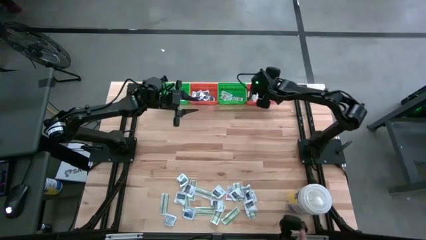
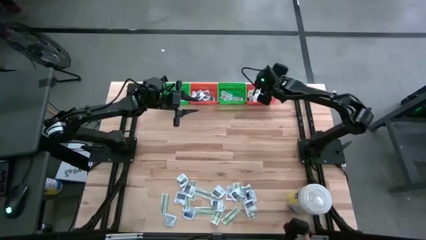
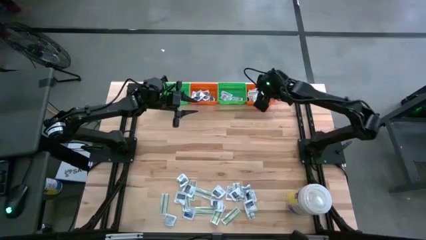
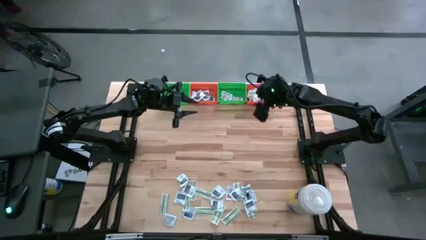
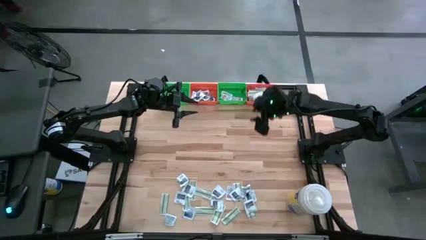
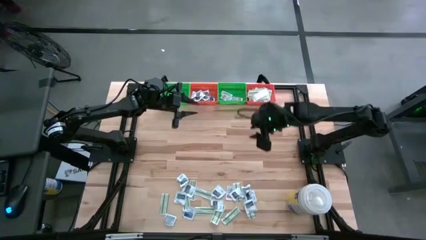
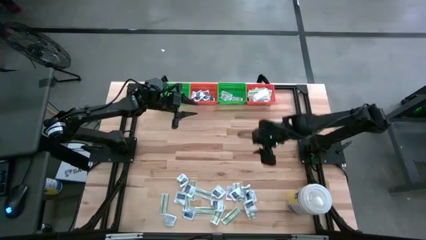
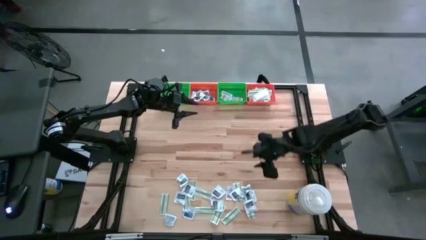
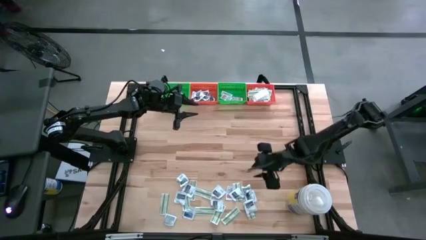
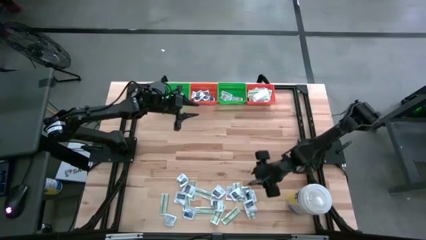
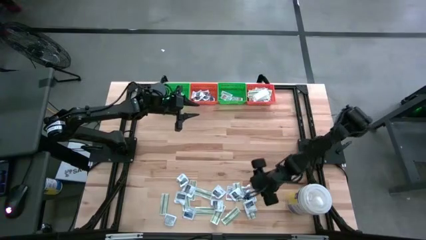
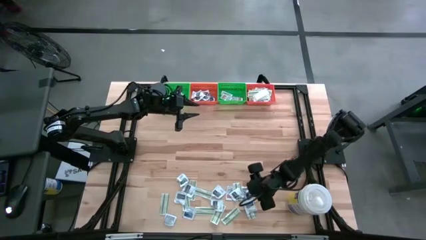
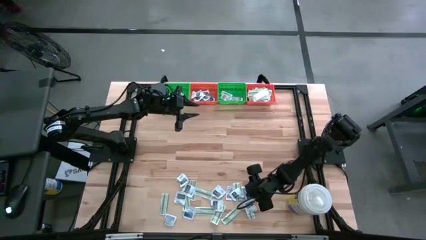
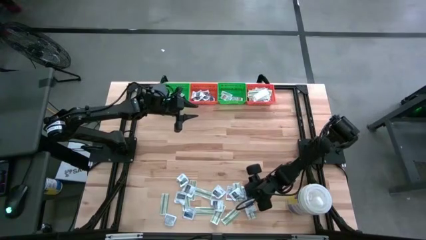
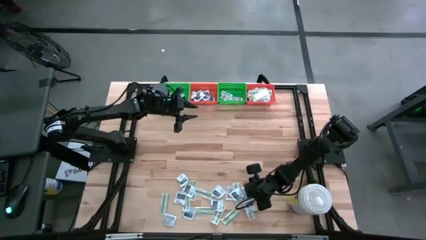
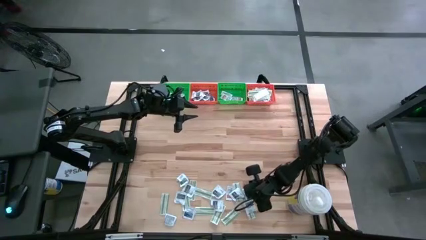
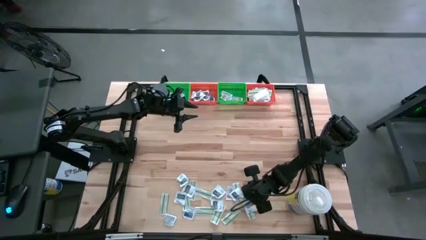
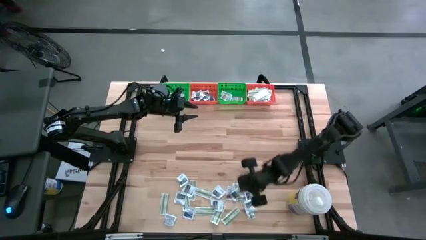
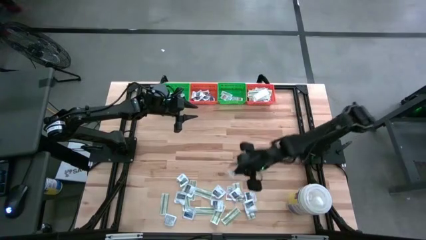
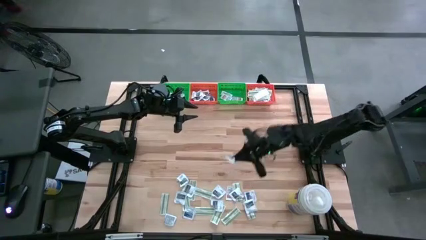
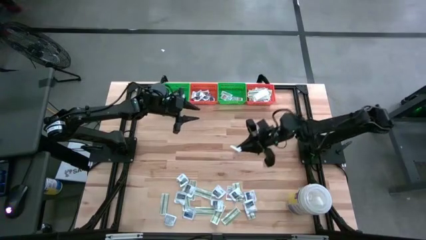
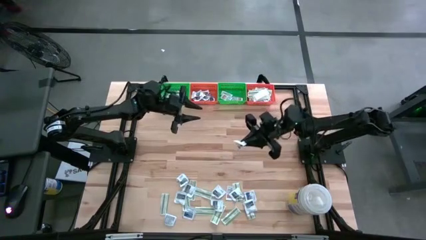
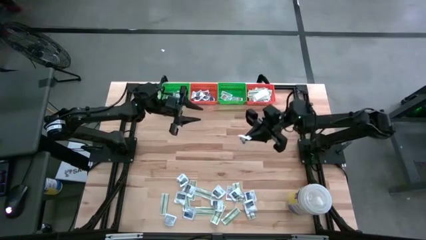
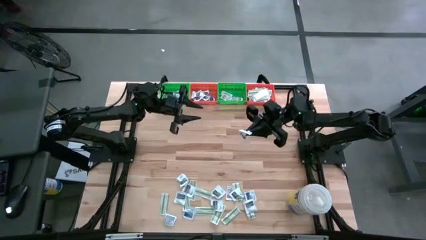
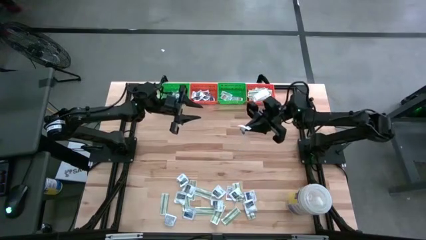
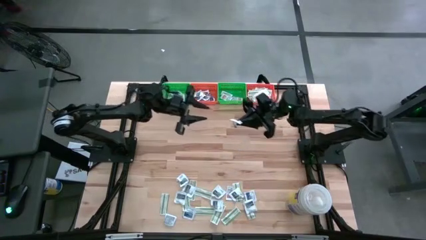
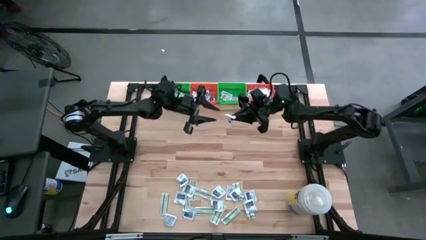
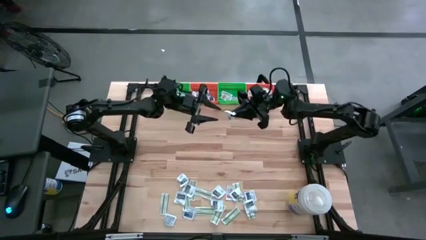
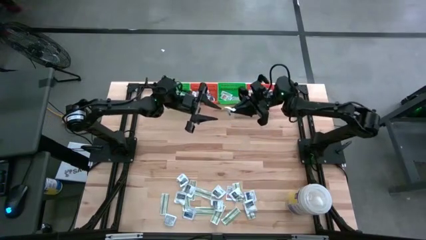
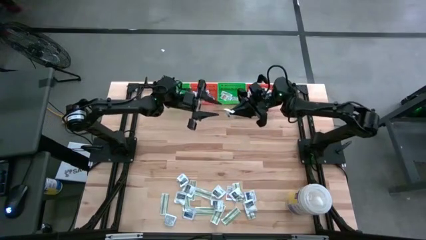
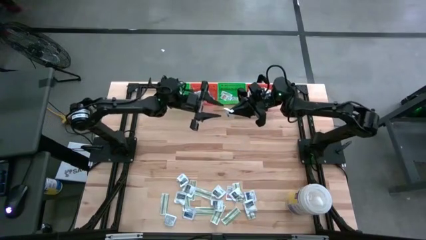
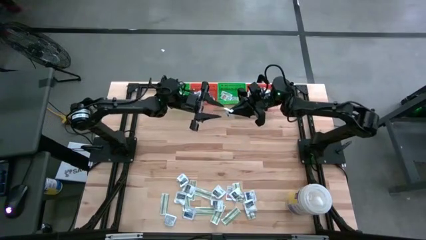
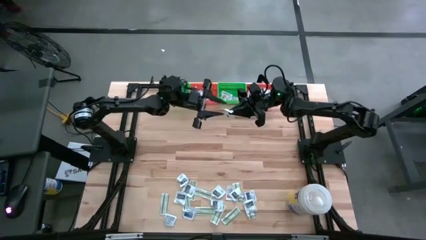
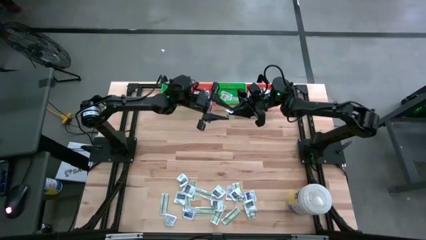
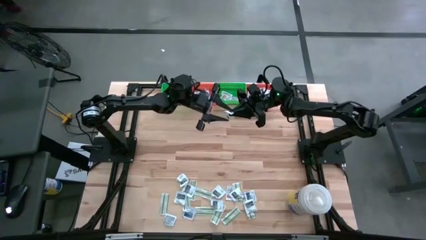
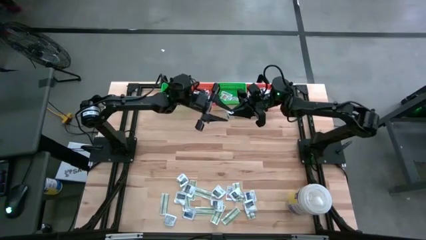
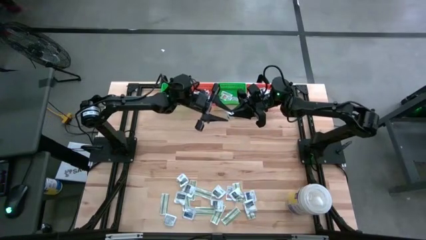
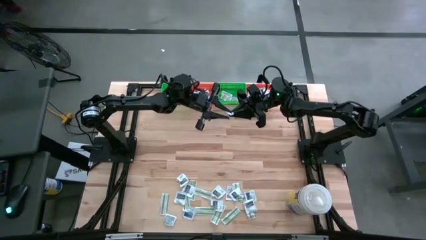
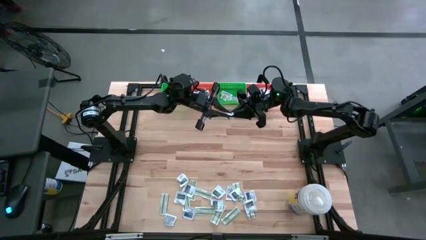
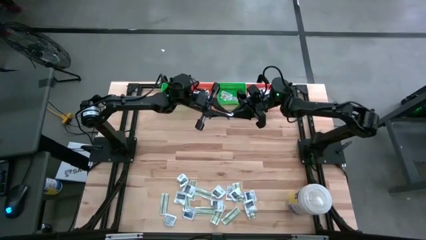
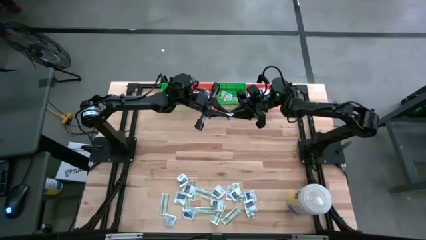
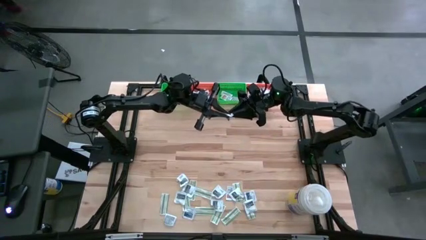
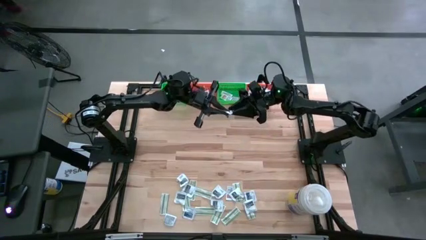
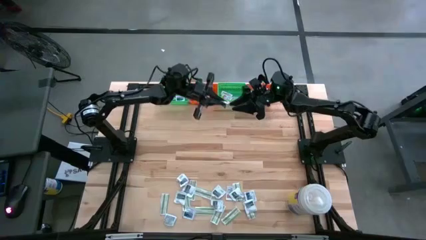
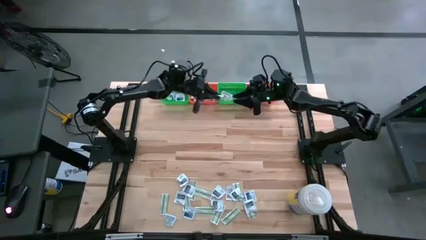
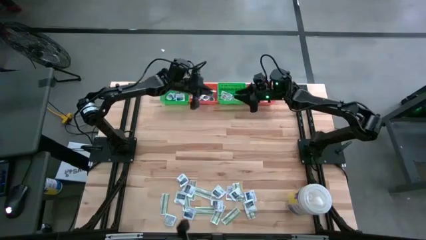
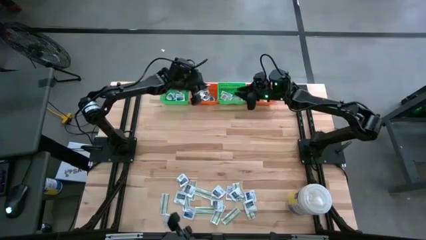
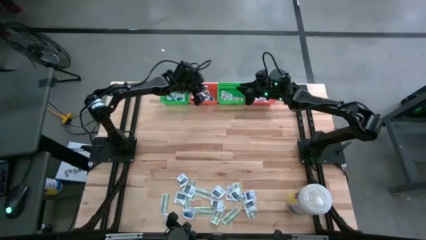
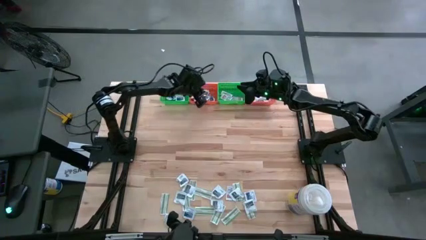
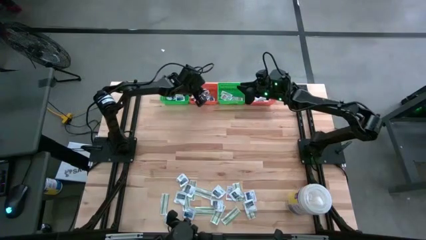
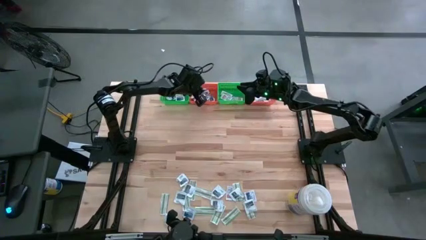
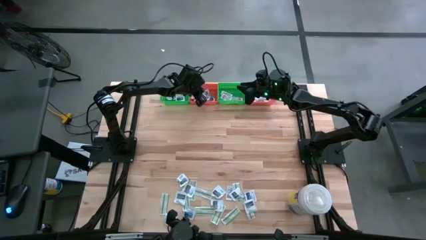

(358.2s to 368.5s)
Task: Pick & Place First Aid Supplies
Put the gray towelette pack in the left orange bin

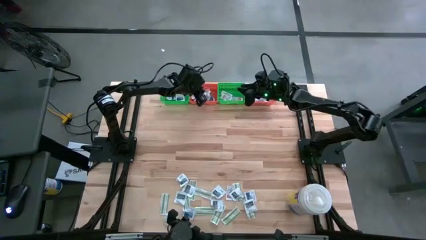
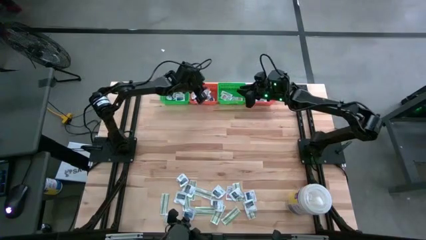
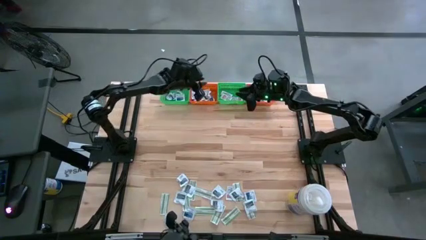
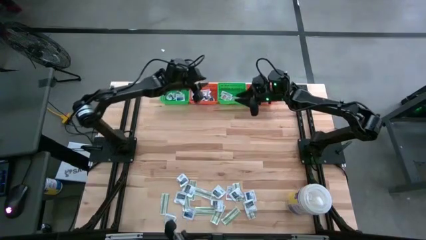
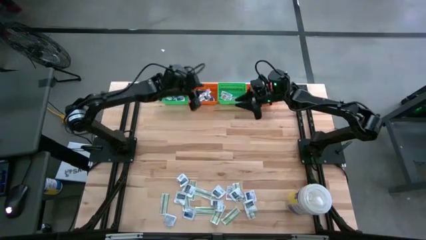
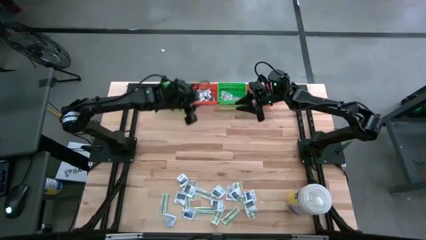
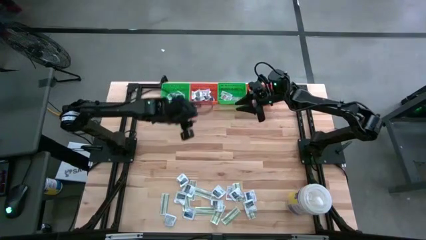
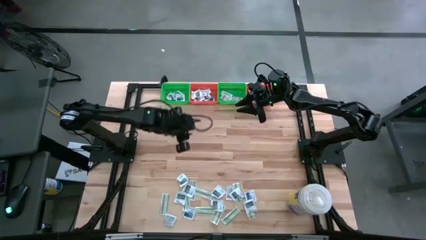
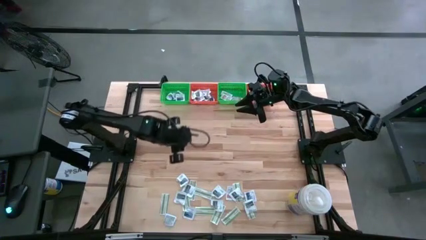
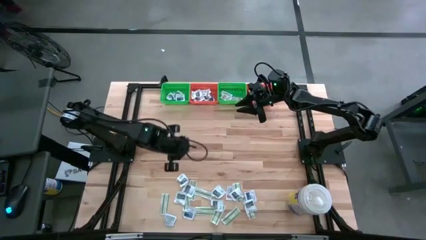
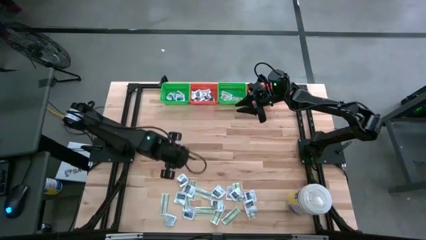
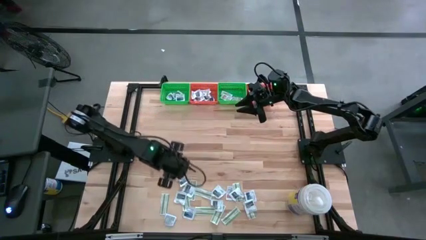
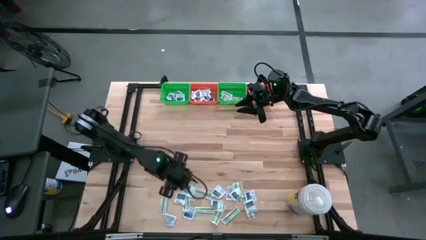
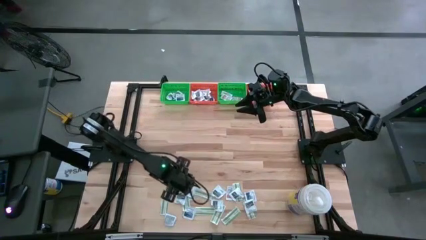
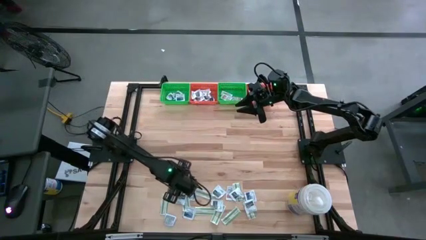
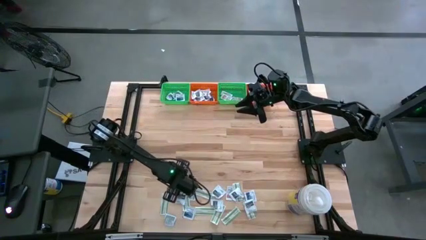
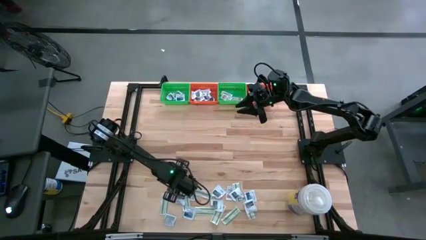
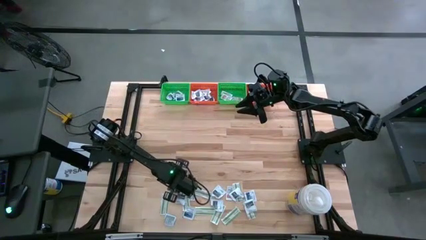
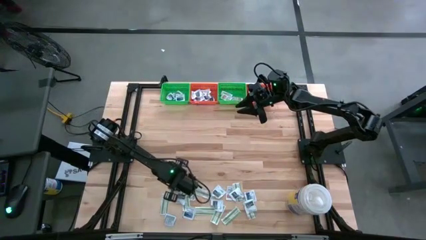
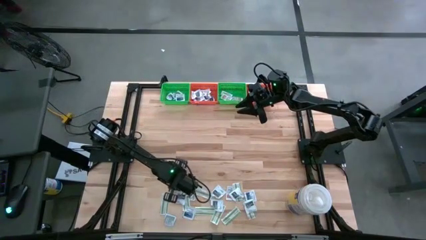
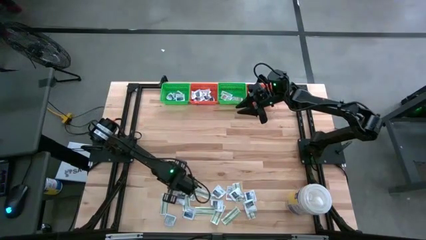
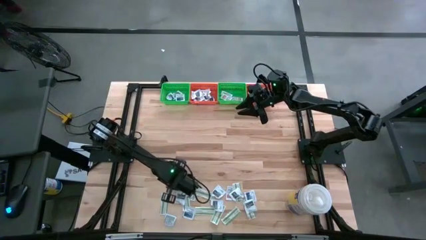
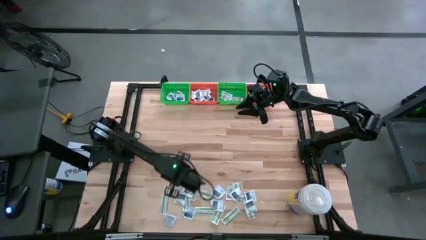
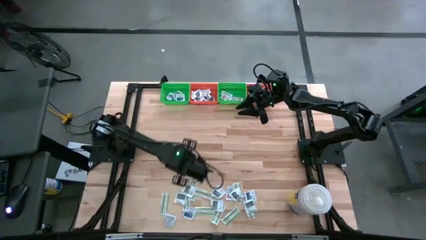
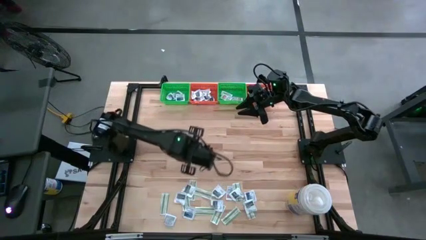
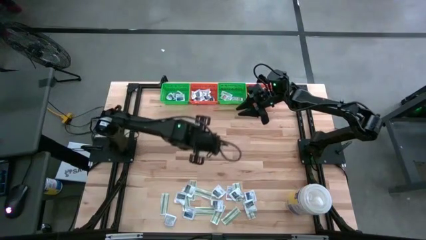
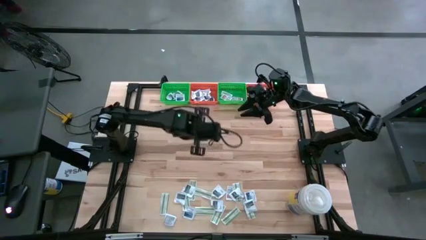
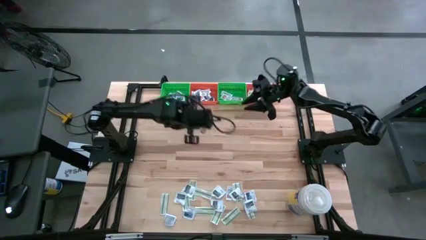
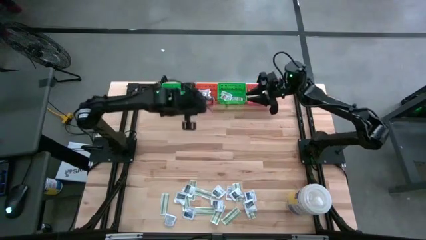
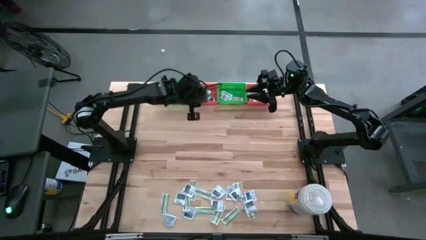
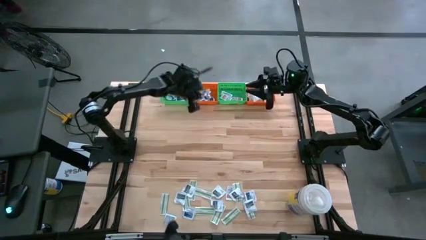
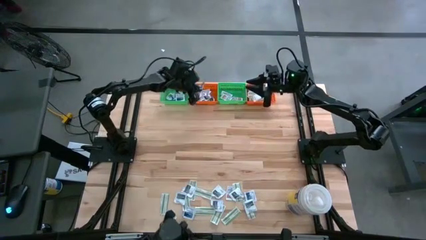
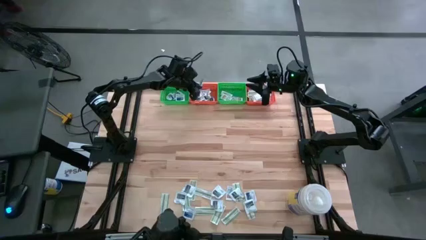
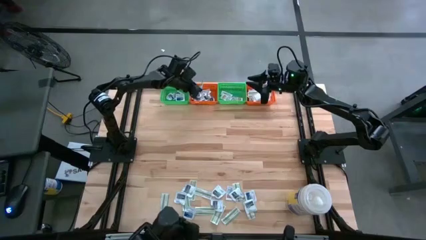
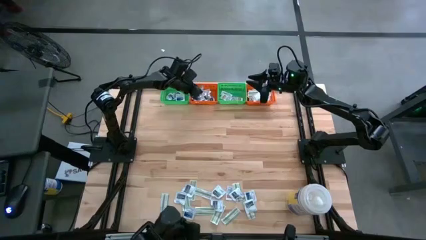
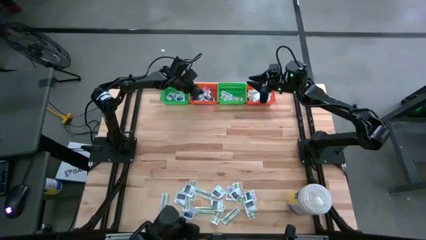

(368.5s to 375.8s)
Put the gray towelette pack in the left orange bin
